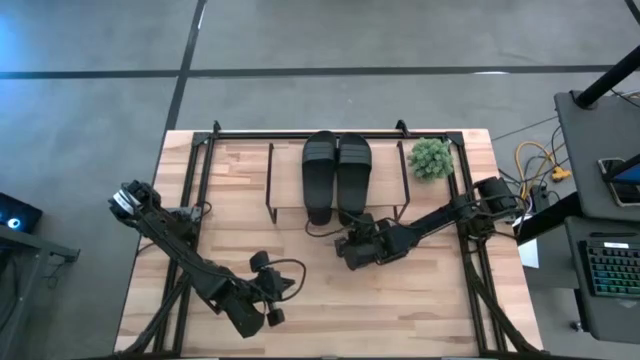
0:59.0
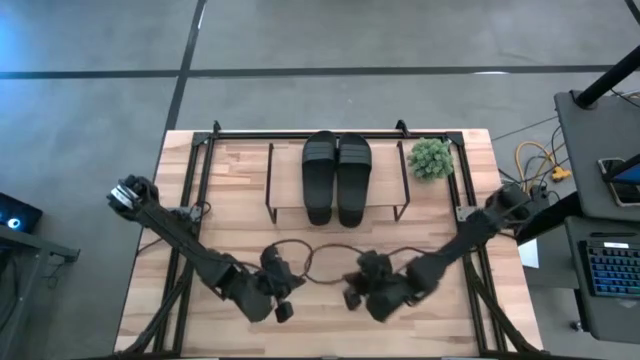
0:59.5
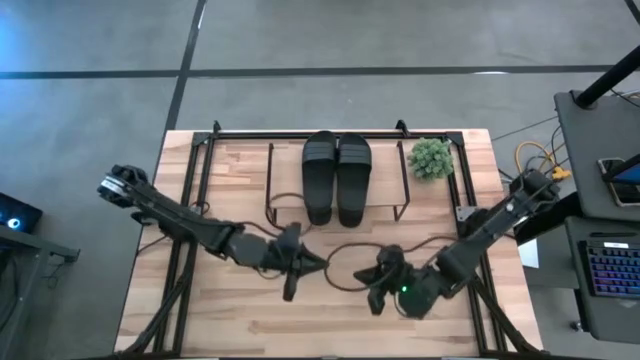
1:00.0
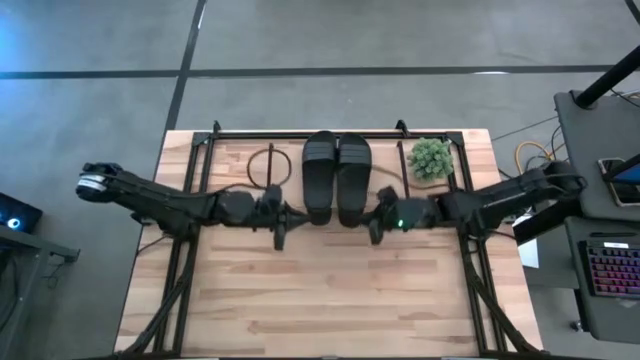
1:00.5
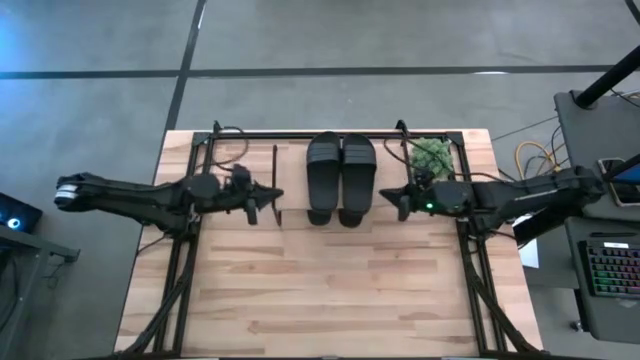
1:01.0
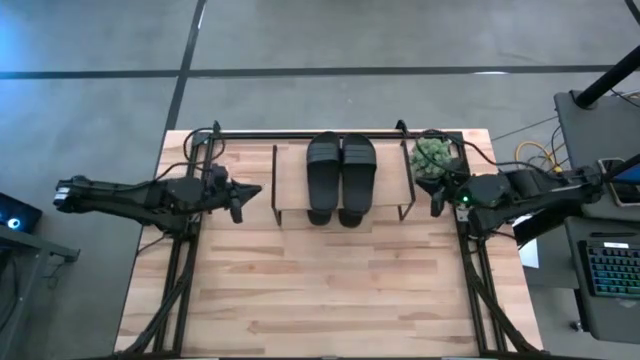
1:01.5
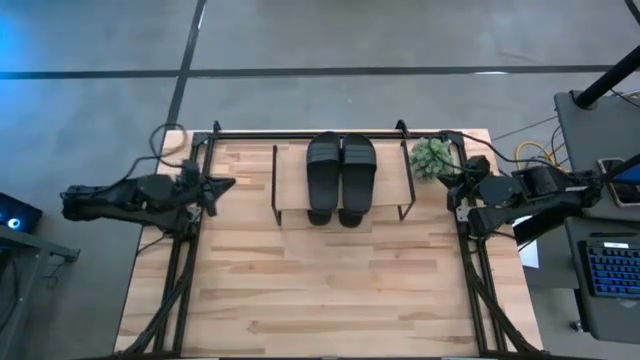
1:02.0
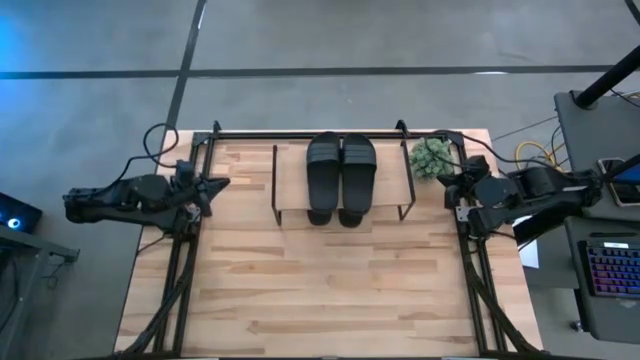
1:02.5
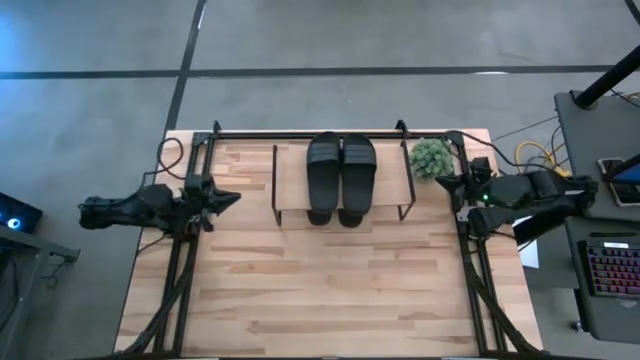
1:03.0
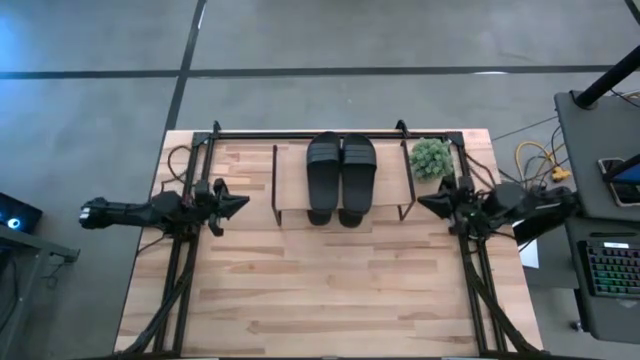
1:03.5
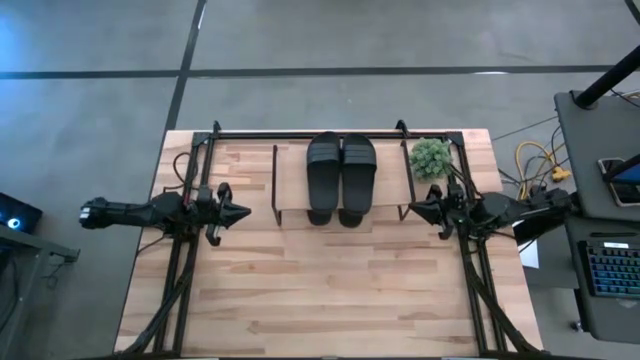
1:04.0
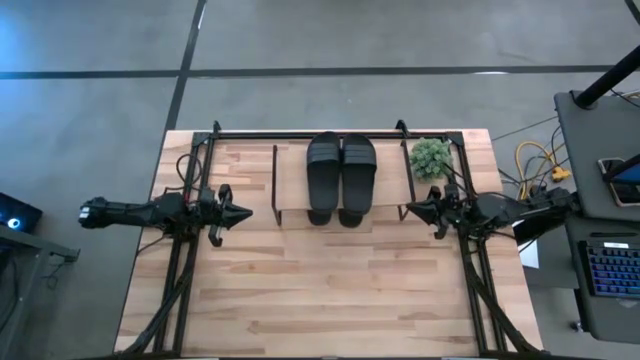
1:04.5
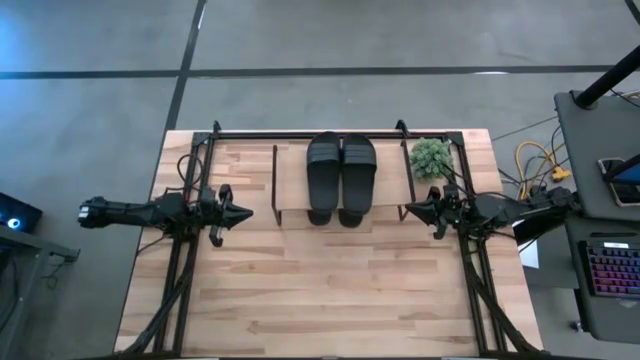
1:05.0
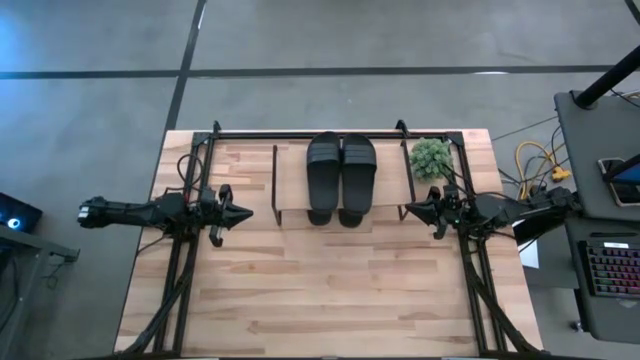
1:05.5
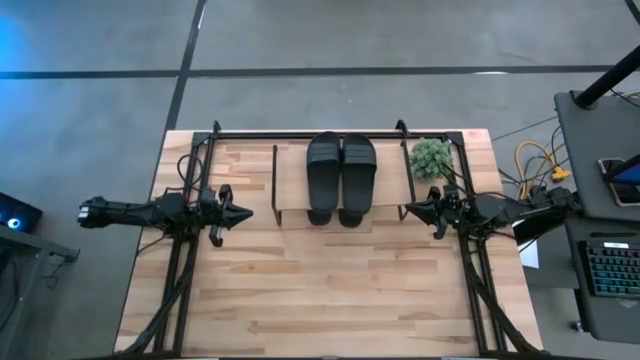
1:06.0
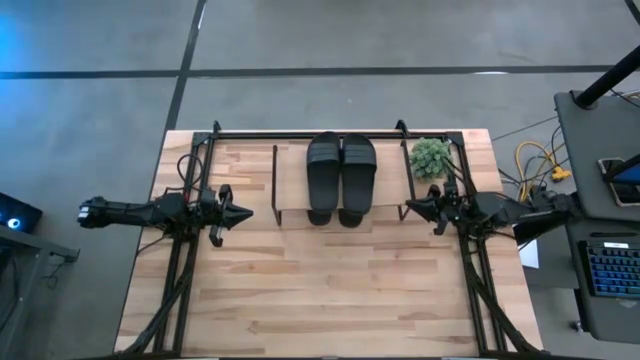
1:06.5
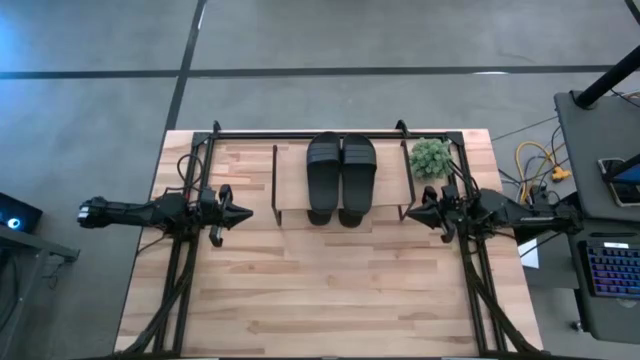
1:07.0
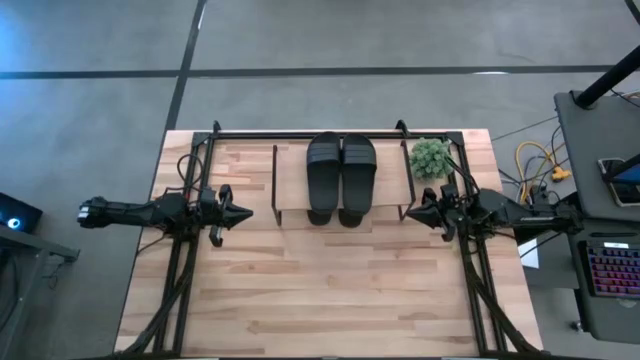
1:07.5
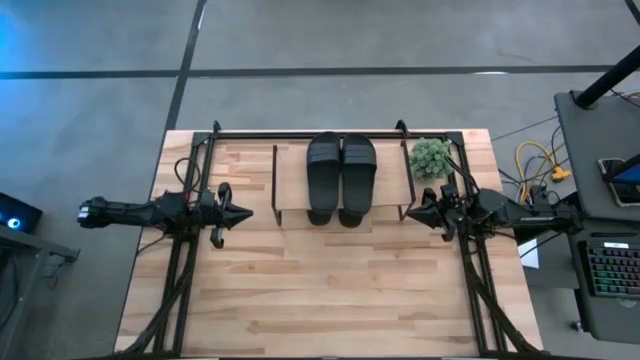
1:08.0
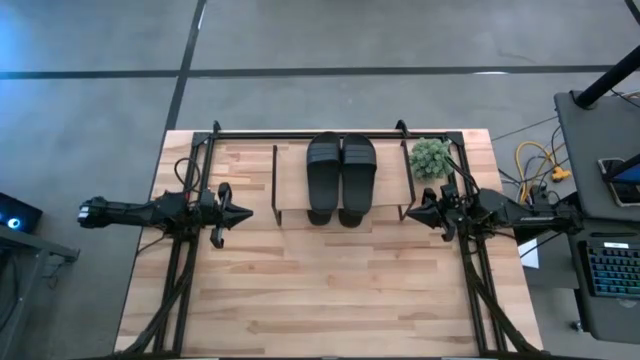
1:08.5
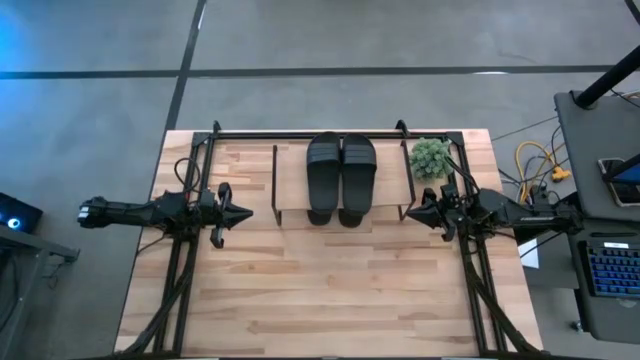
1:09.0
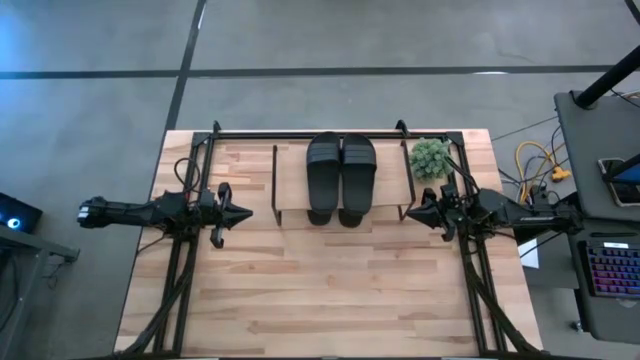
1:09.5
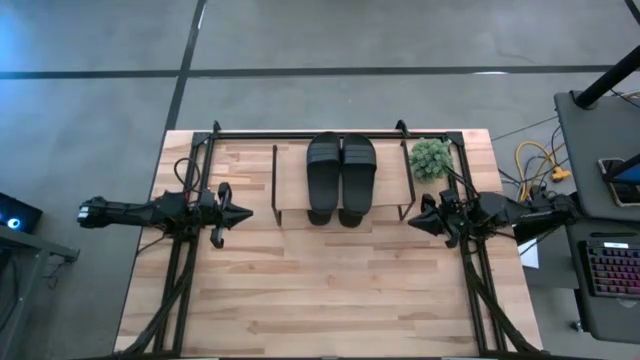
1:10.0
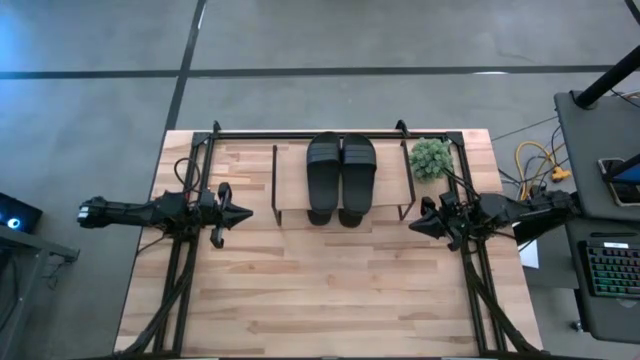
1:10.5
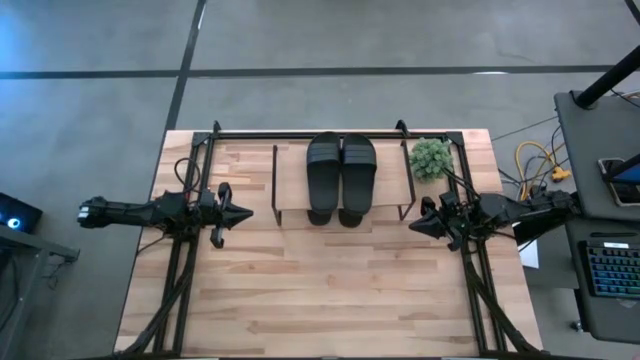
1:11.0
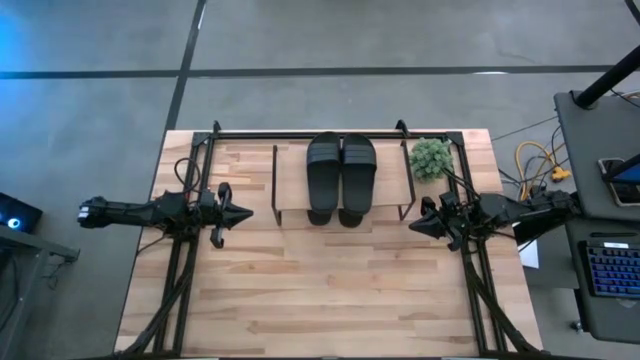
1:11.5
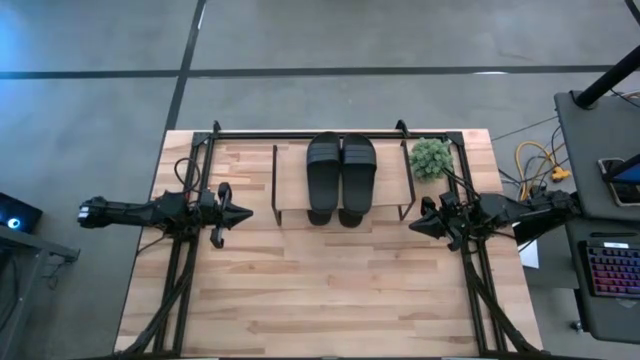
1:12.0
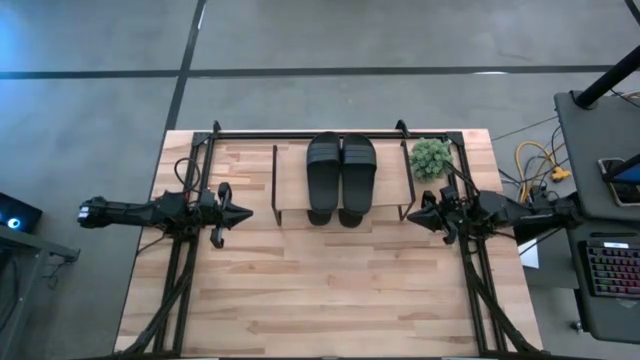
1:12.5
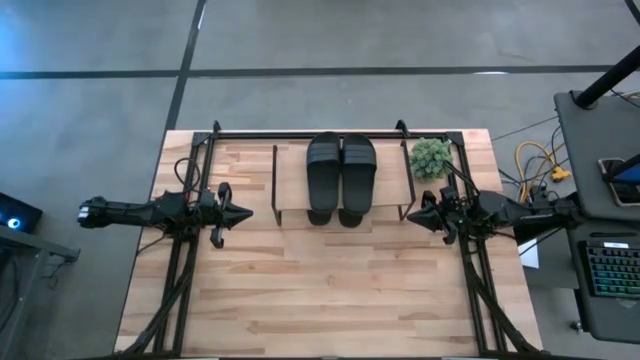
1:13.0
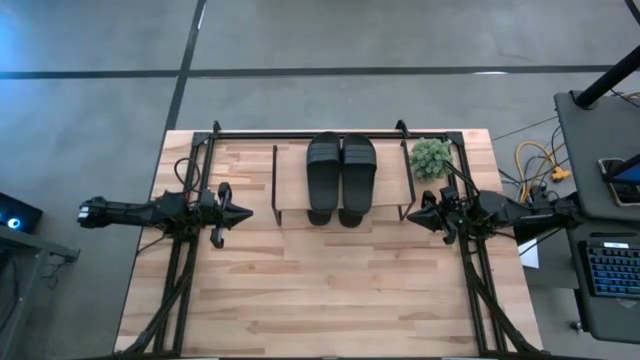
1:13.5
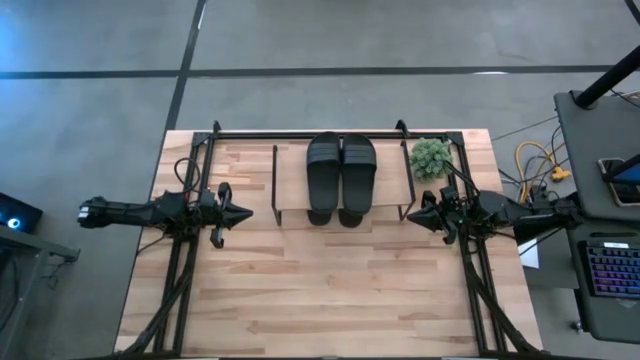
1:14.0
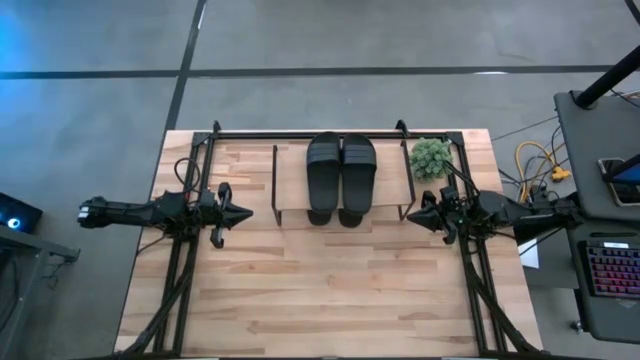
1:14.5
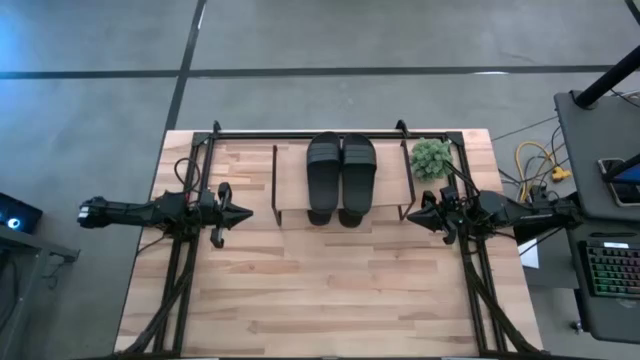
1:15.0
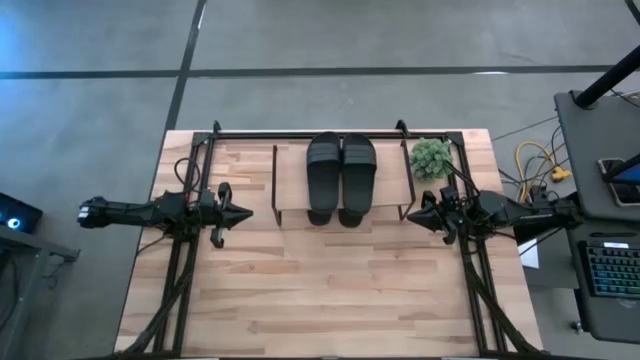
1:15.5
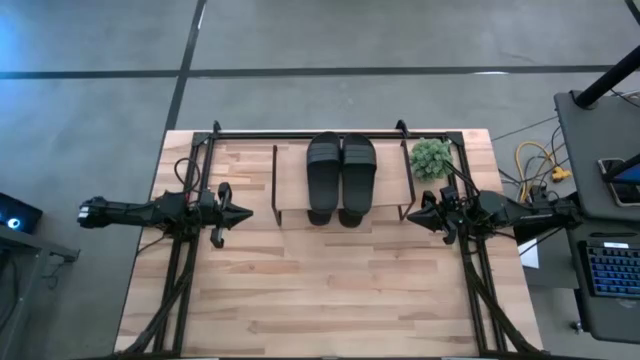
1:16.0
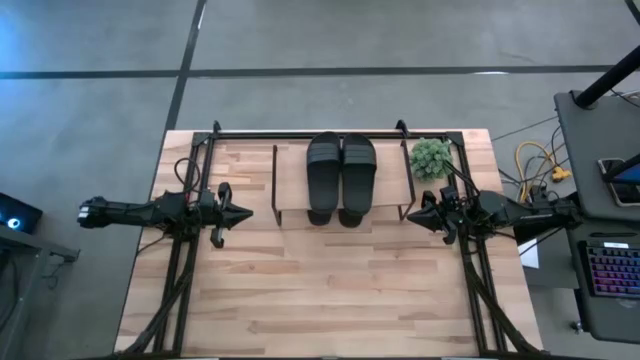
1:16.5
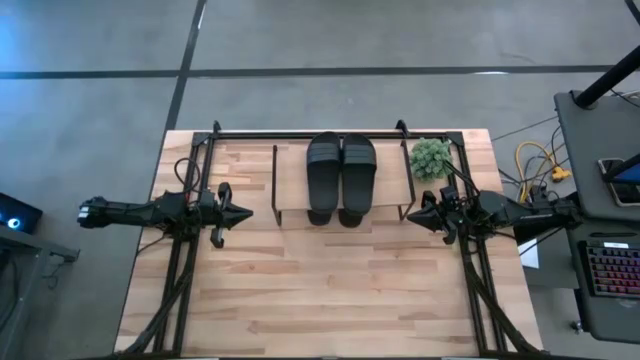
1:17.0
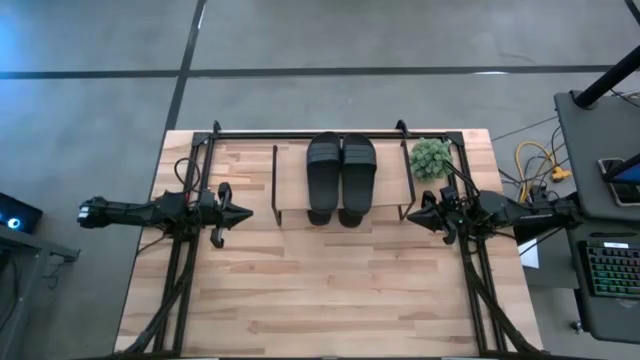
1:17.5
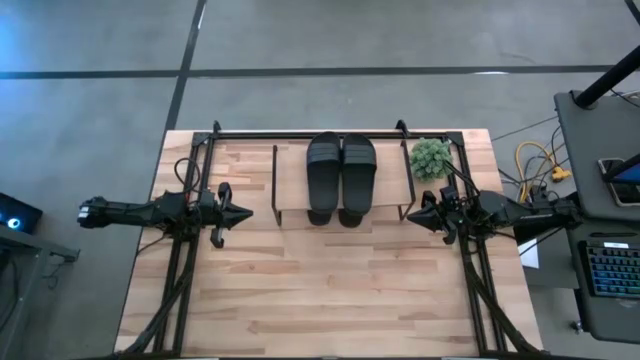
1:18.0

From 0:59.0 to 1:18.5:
Task: Pick and place slides into the shelf
Return to Home Position
